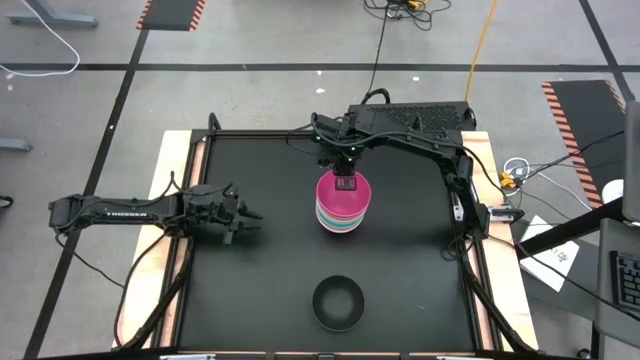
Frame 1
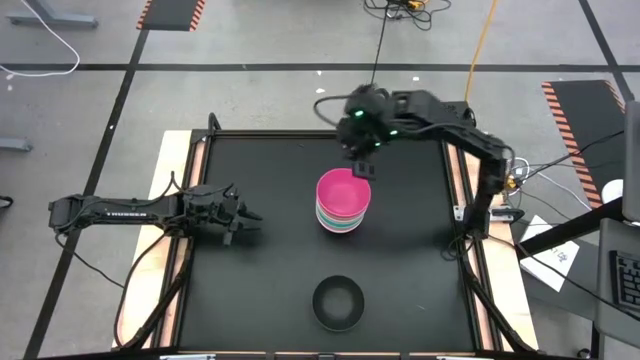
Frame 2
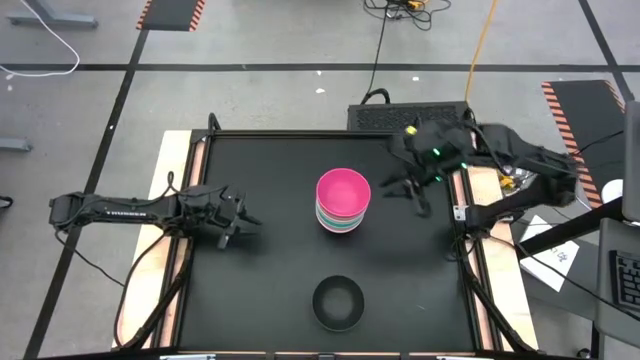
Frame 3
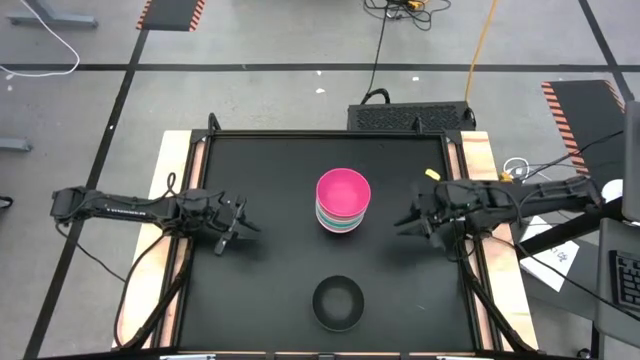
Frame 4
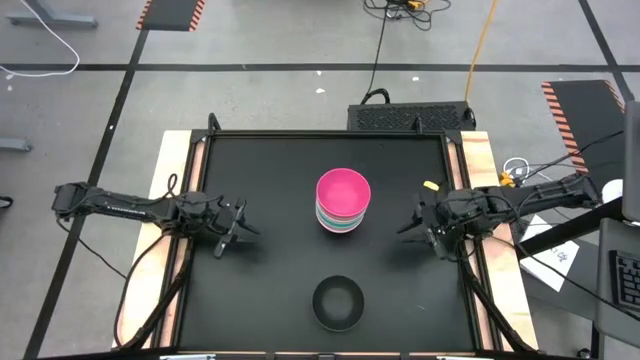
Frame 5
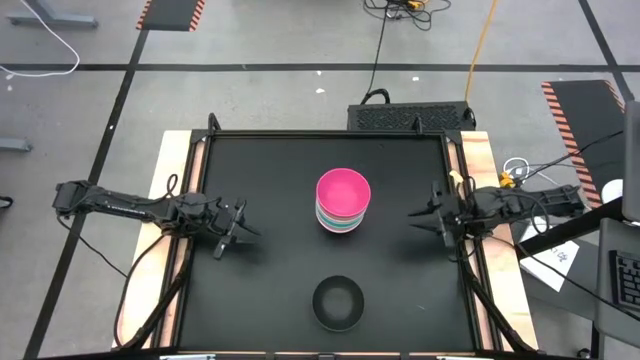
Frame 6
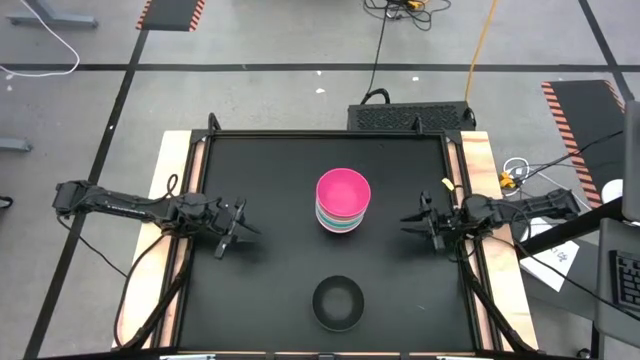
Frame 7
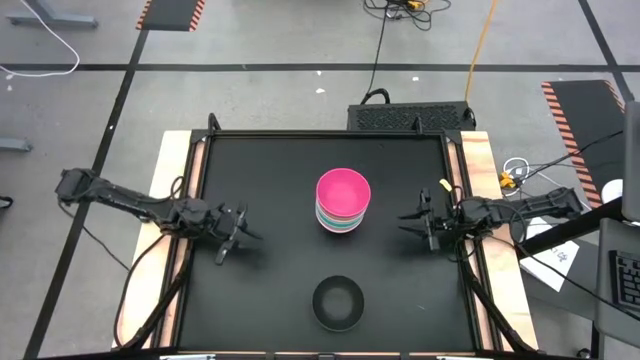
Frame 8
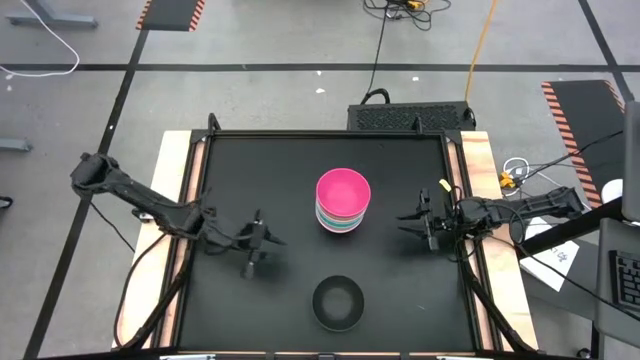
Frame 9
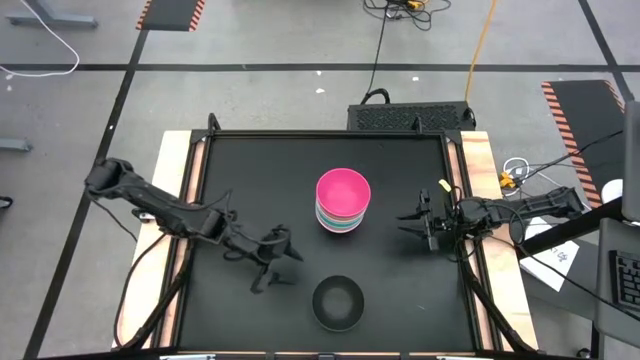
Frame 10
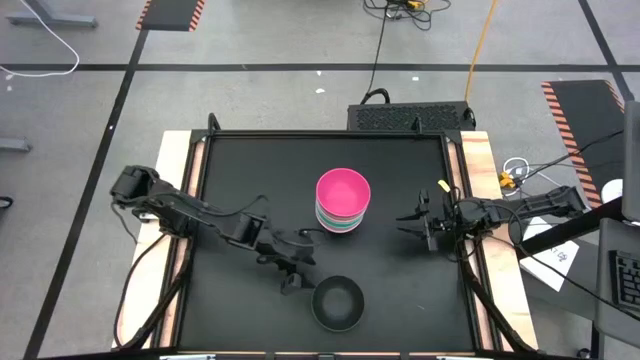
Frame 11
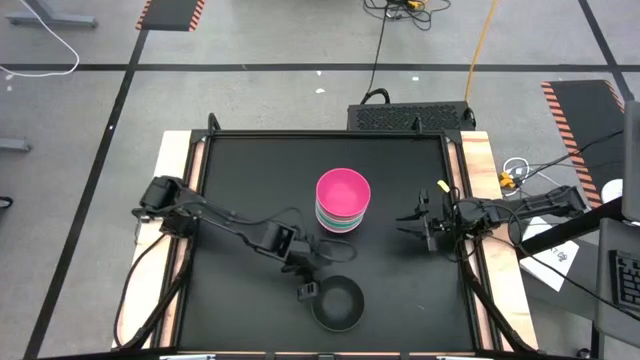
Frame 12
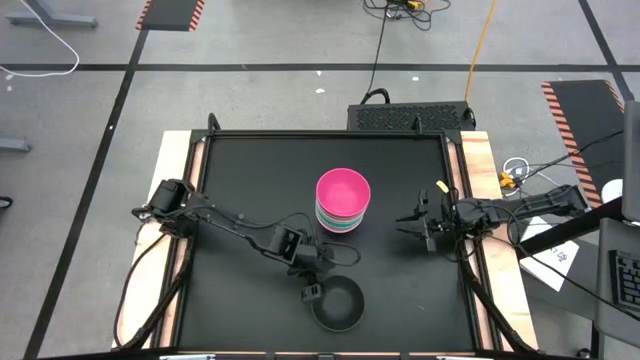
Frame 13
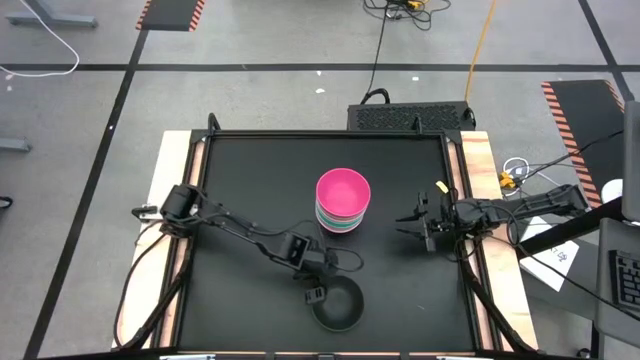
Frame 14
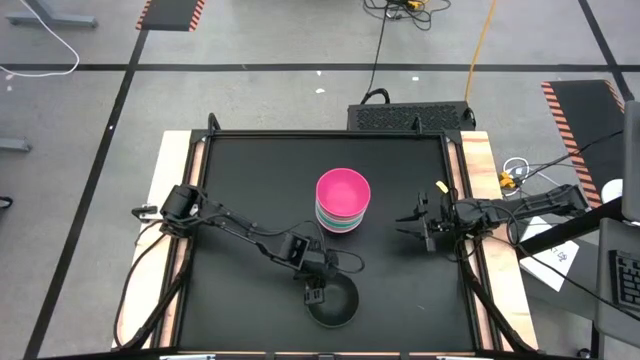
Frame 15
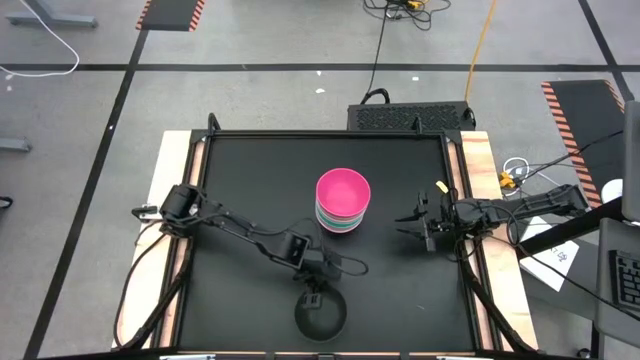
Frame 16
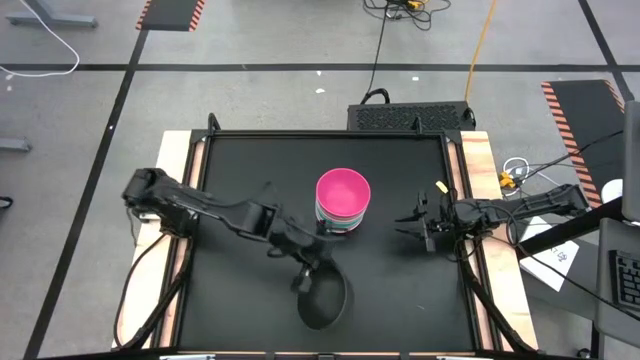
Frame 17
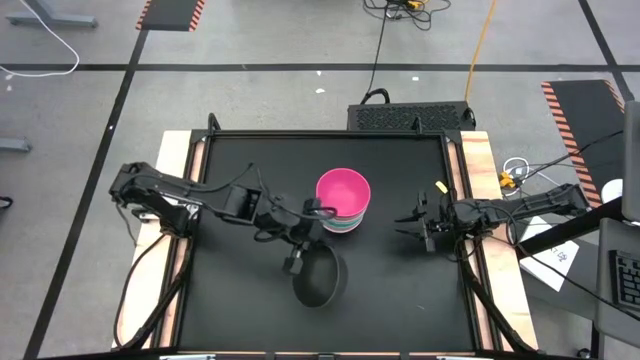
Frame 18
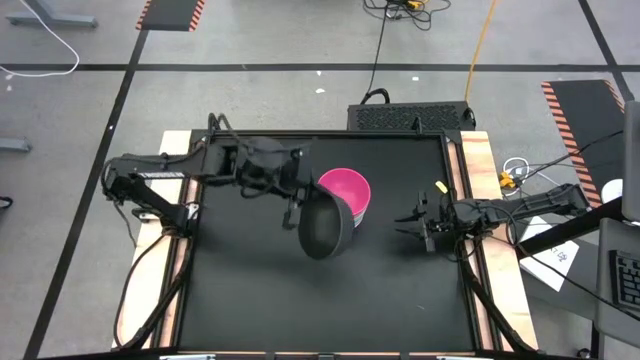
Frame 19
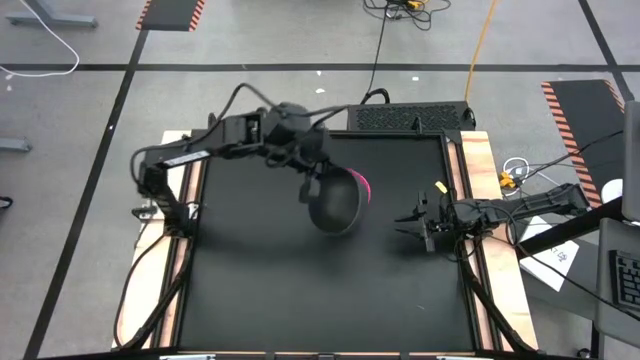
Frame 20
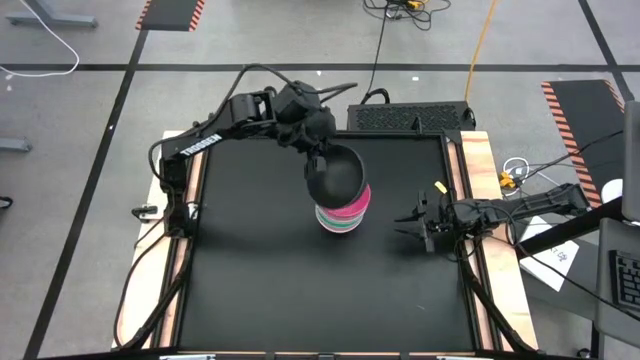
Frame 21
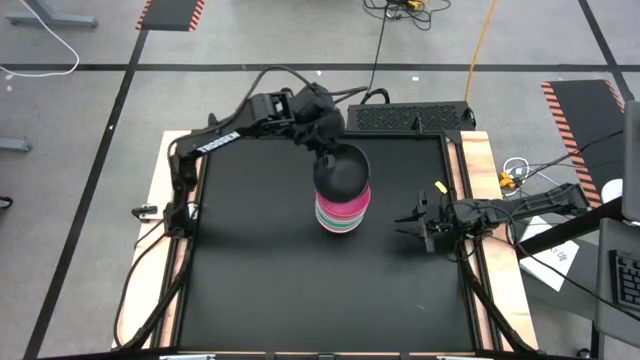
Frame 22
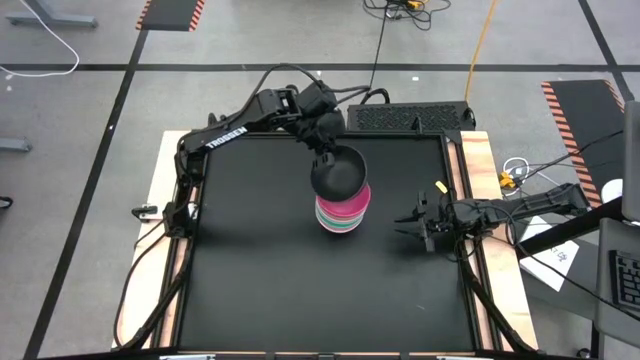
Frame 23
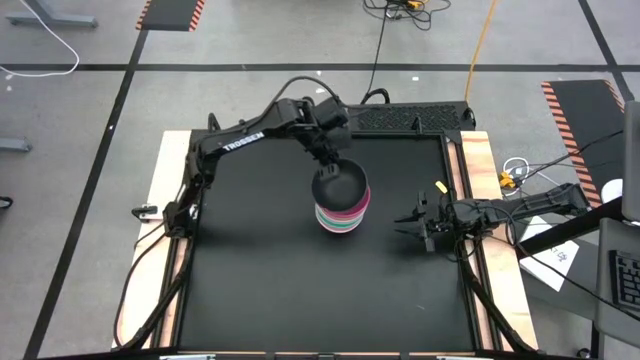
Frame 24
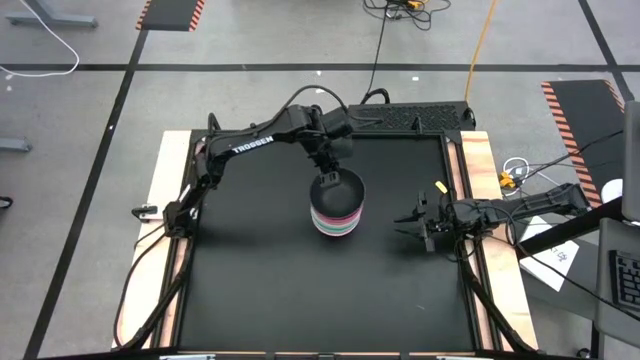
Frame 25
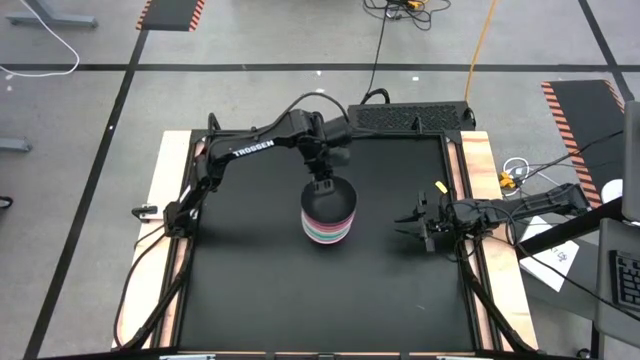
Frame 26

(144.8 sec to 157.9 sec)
Task: Nest bowls inside each other
Stack the black bowl on top of pink bowl

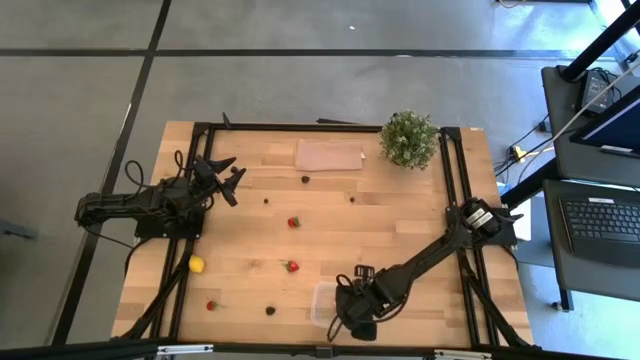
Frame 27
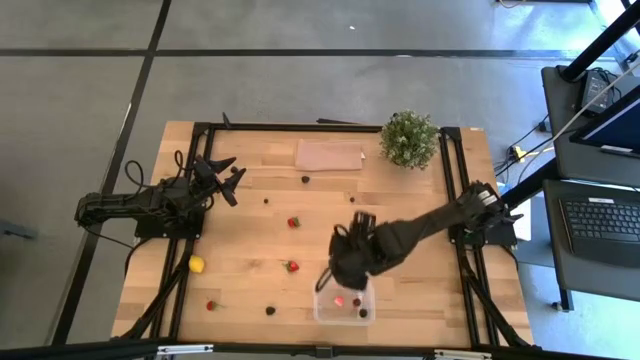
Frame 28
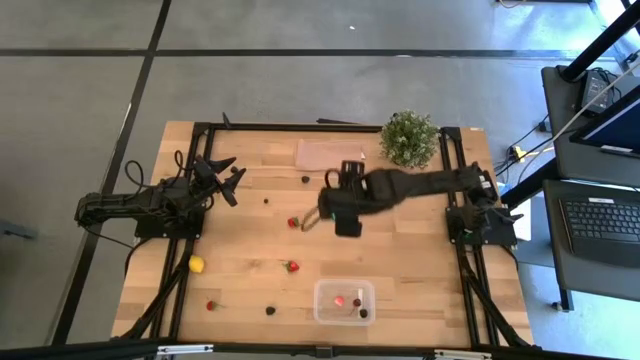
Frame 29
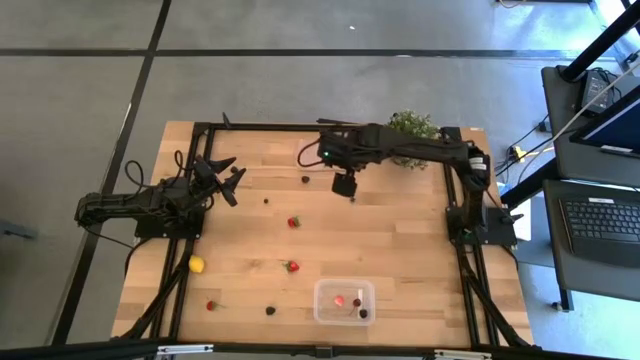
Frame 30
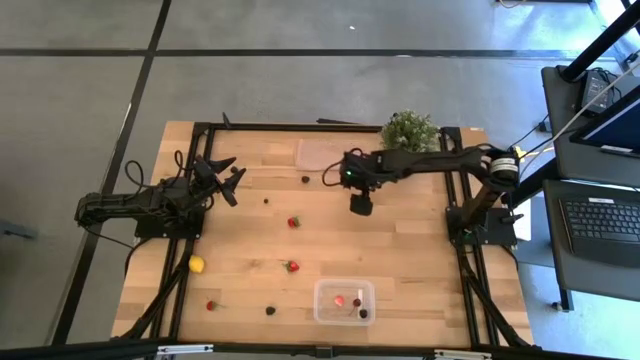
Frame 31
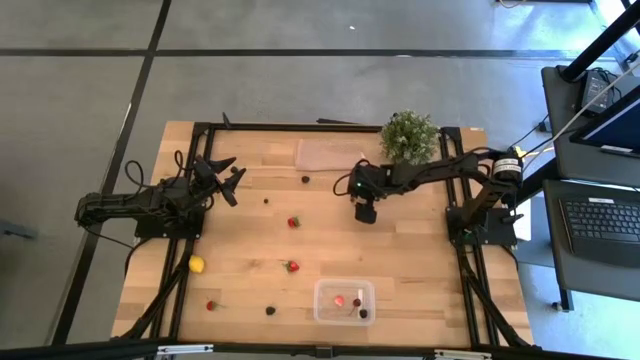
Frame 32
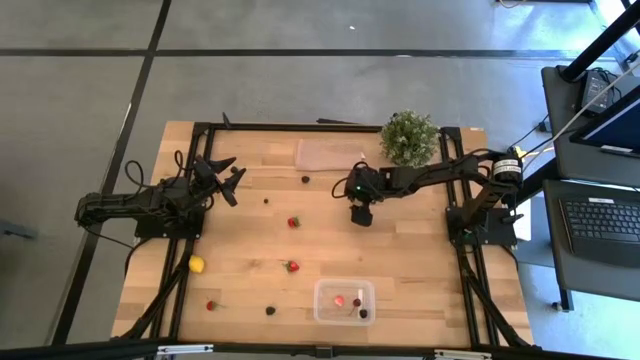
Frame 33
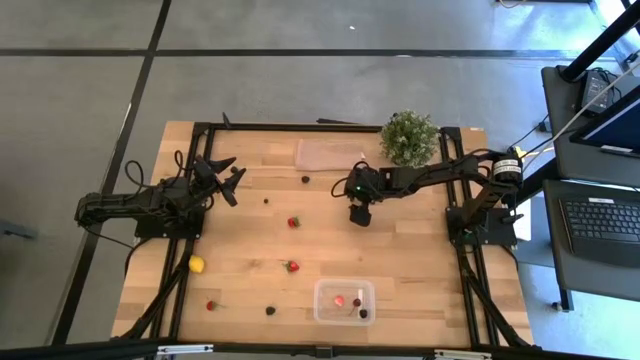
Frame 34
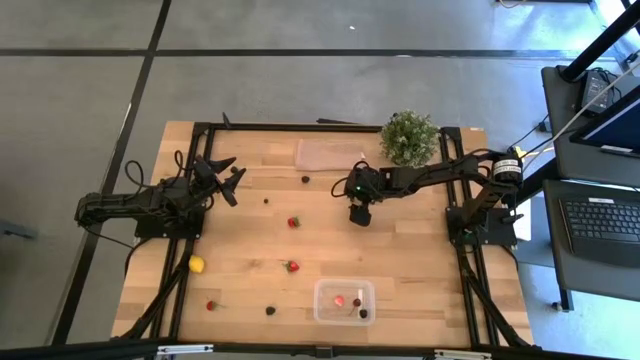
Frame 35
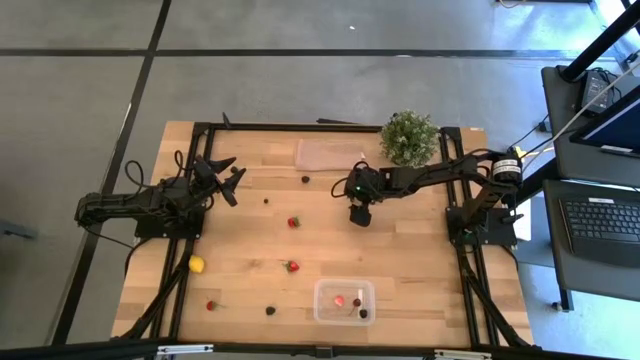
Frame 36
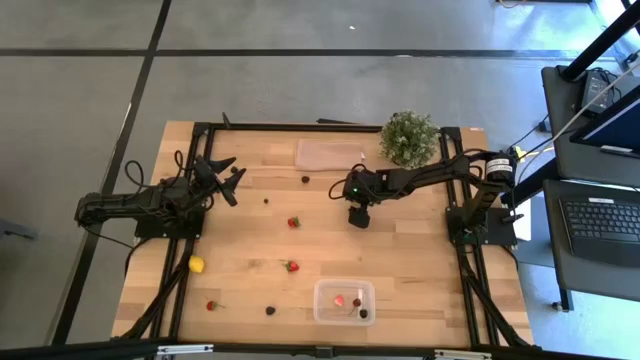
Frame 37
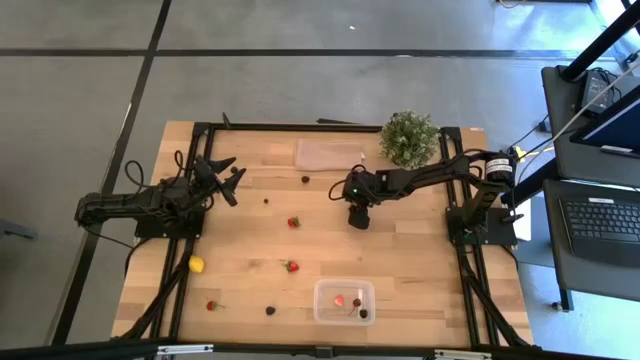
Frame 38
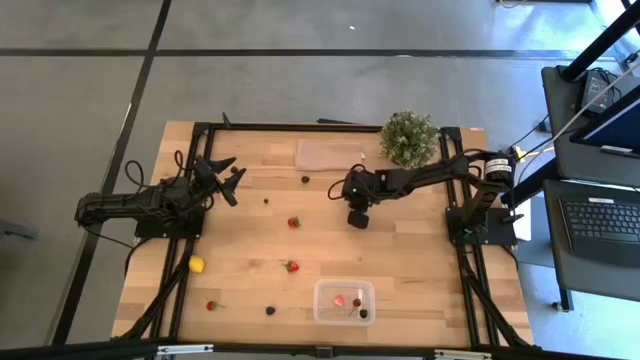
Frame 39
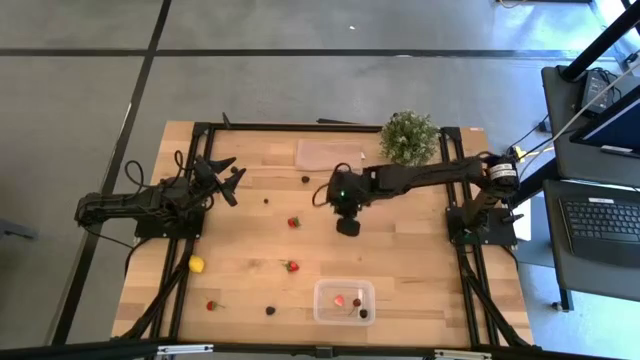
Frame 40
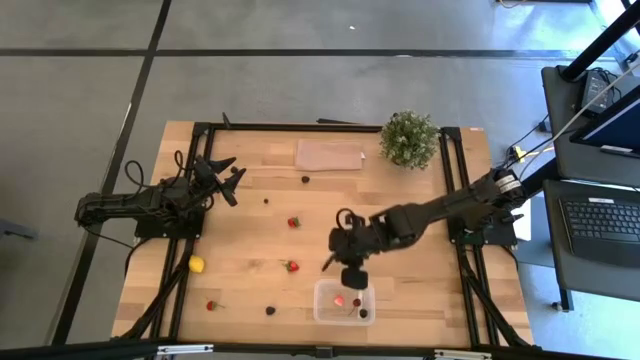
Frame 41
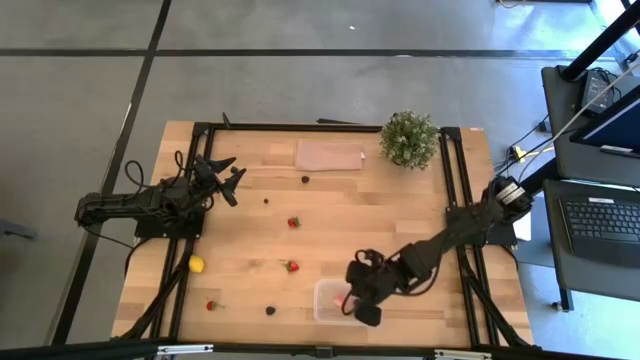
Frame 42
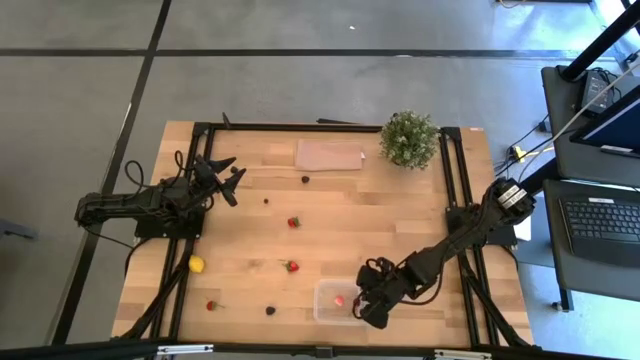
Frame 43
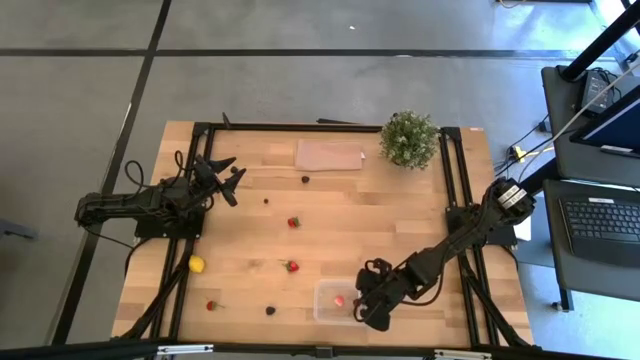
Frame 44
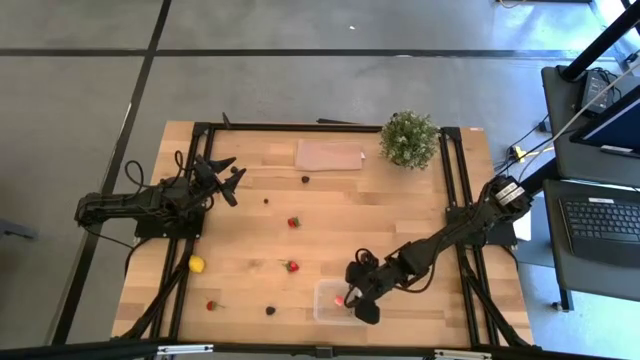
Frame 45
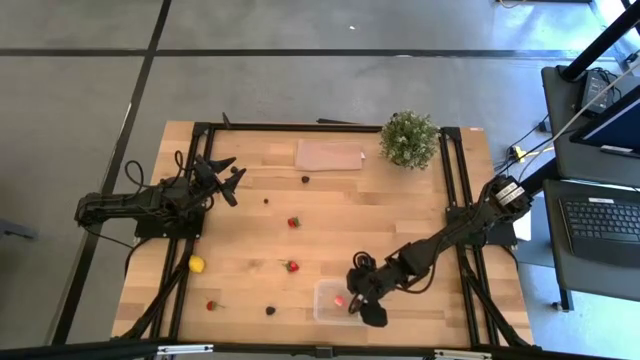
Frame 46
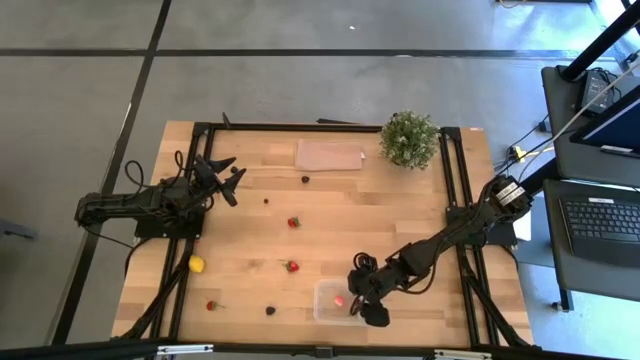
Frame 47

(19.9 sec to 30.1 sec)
Task: Pick and placing Produce into tupperware
Put the right blueberry into the transparent container
